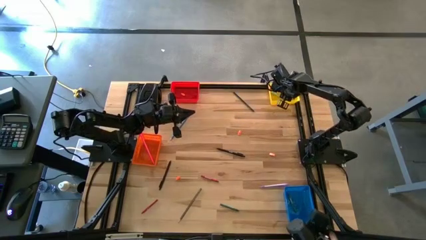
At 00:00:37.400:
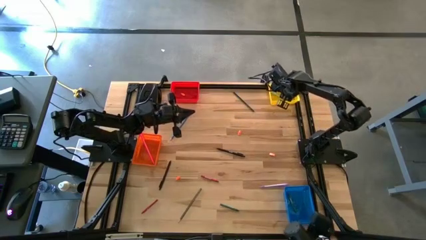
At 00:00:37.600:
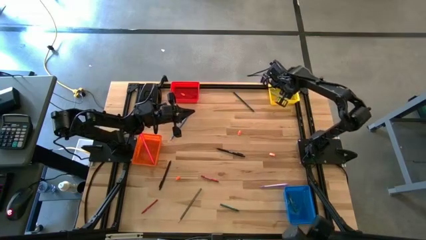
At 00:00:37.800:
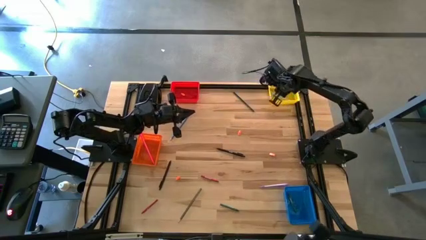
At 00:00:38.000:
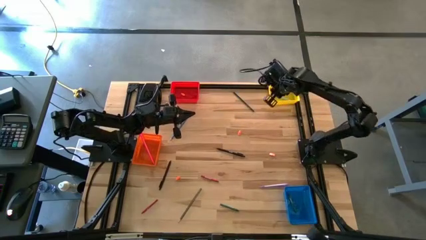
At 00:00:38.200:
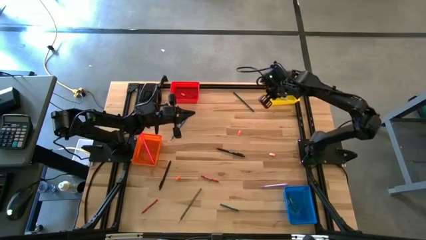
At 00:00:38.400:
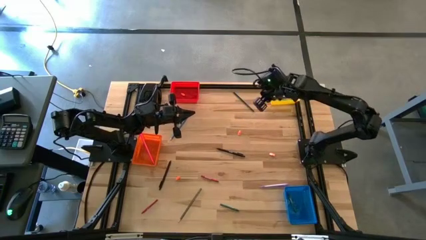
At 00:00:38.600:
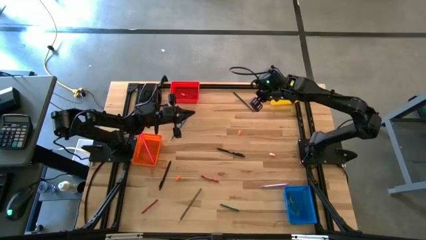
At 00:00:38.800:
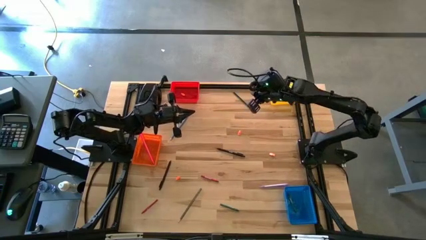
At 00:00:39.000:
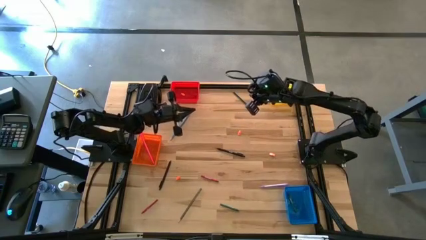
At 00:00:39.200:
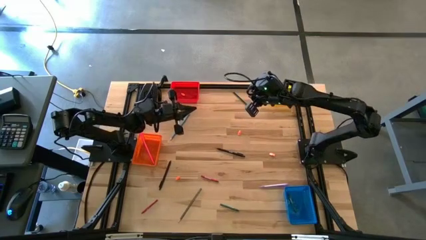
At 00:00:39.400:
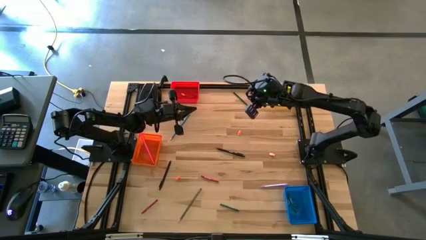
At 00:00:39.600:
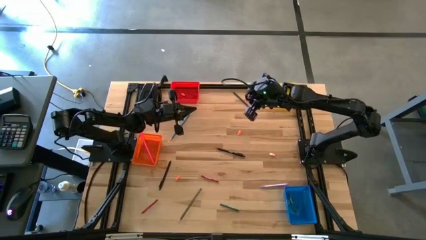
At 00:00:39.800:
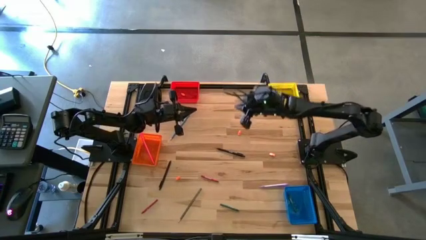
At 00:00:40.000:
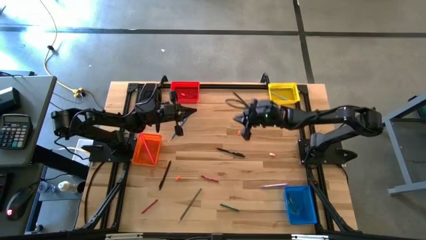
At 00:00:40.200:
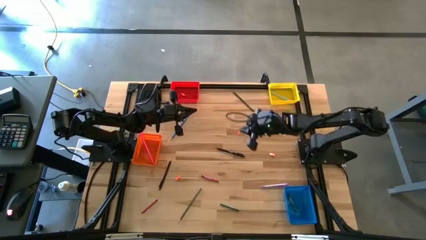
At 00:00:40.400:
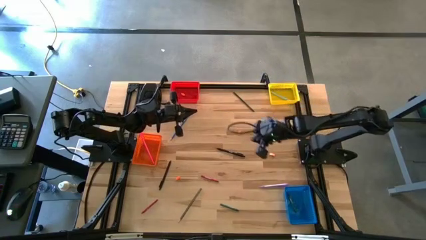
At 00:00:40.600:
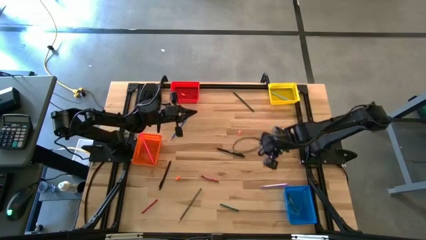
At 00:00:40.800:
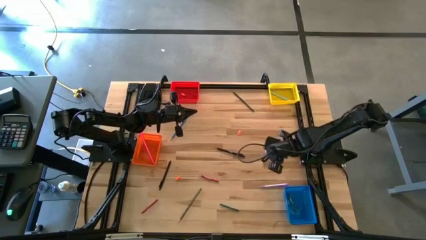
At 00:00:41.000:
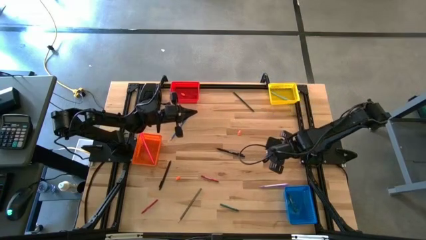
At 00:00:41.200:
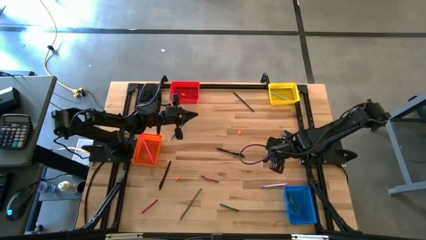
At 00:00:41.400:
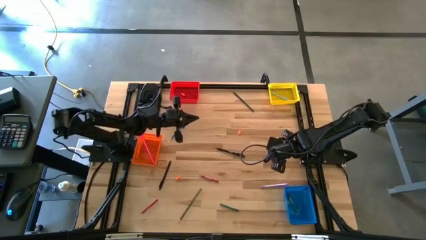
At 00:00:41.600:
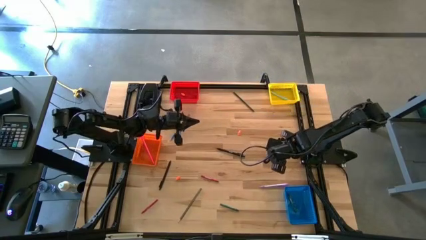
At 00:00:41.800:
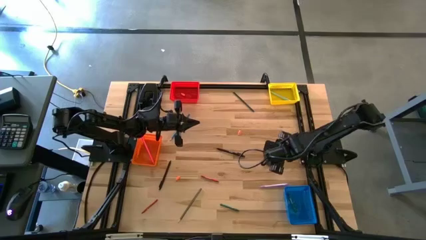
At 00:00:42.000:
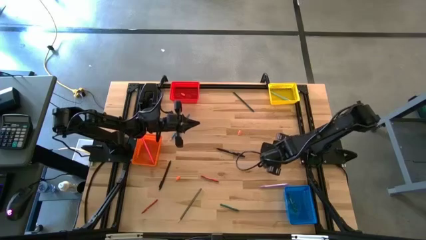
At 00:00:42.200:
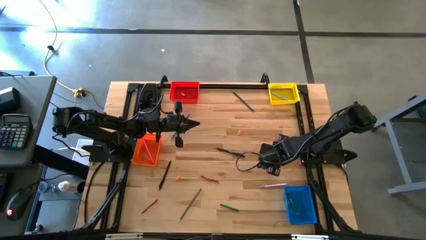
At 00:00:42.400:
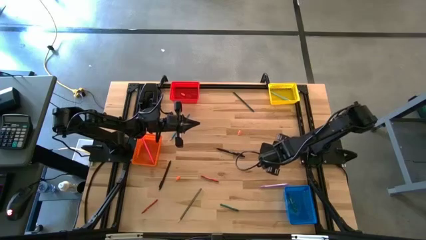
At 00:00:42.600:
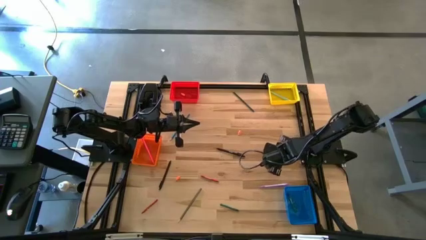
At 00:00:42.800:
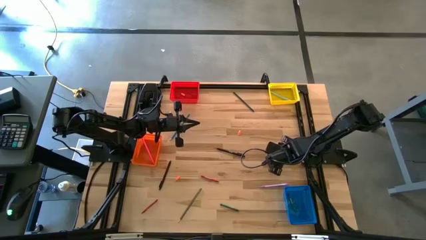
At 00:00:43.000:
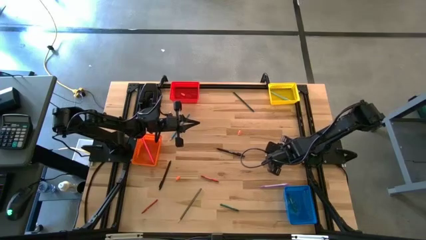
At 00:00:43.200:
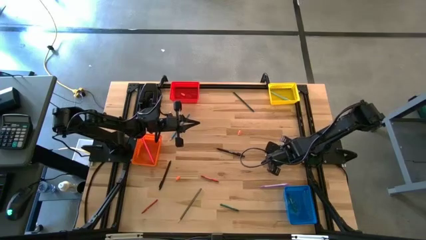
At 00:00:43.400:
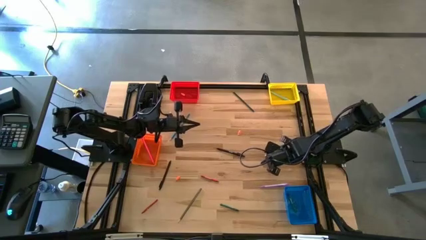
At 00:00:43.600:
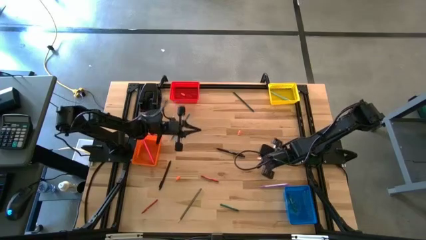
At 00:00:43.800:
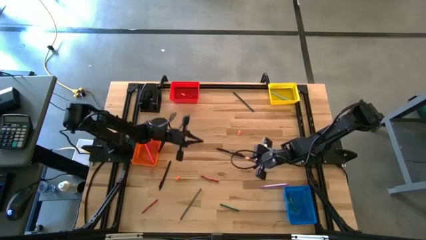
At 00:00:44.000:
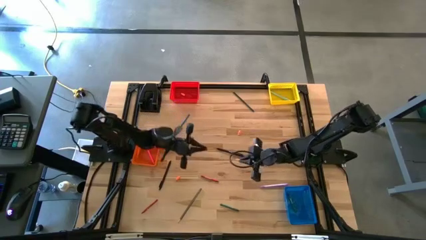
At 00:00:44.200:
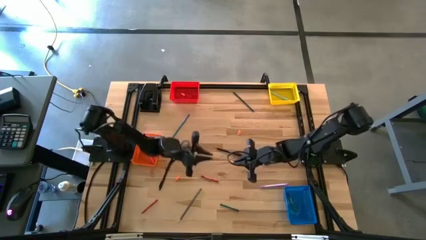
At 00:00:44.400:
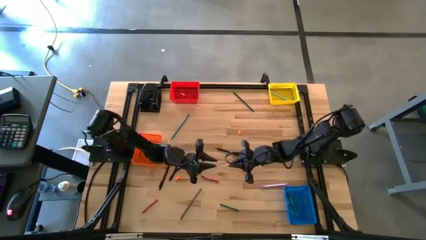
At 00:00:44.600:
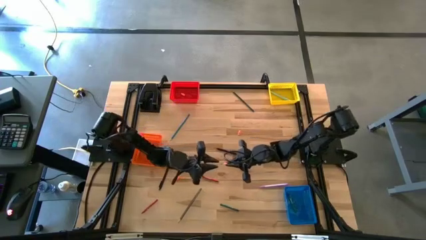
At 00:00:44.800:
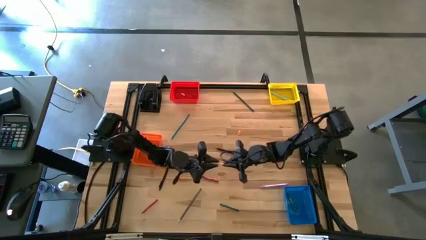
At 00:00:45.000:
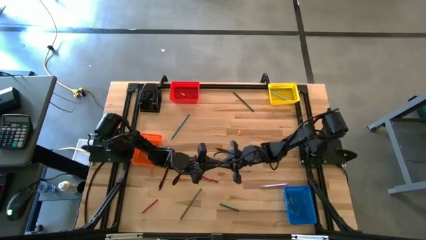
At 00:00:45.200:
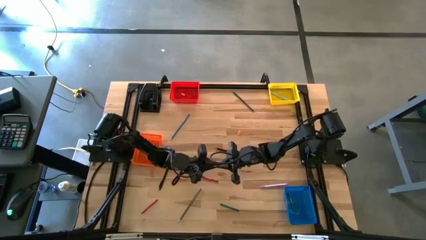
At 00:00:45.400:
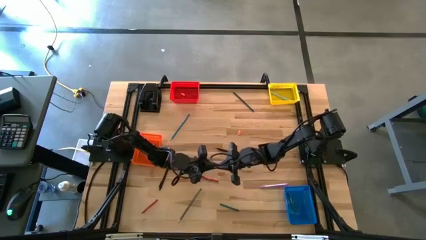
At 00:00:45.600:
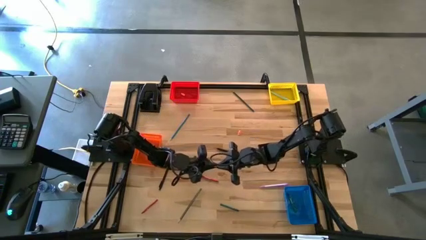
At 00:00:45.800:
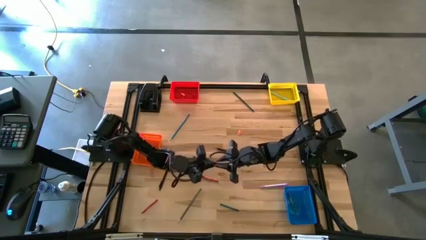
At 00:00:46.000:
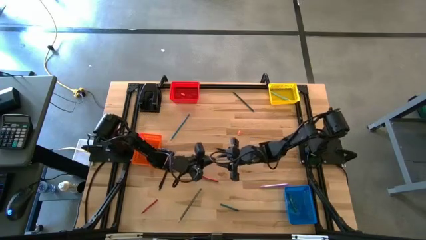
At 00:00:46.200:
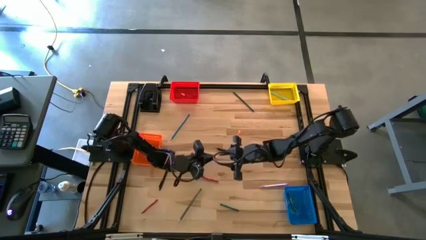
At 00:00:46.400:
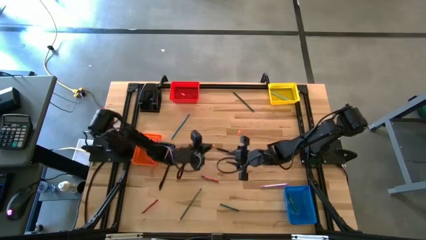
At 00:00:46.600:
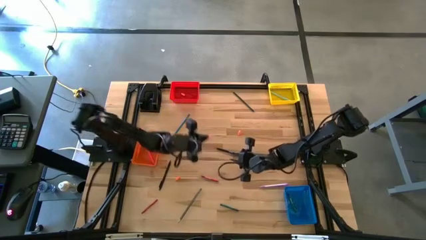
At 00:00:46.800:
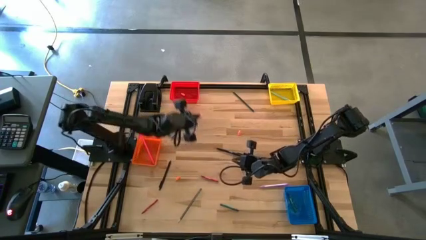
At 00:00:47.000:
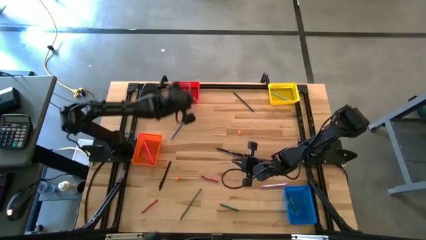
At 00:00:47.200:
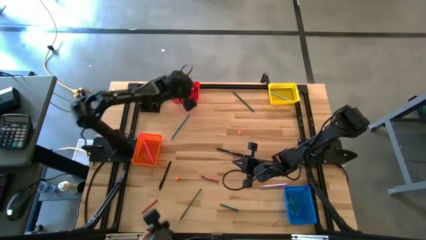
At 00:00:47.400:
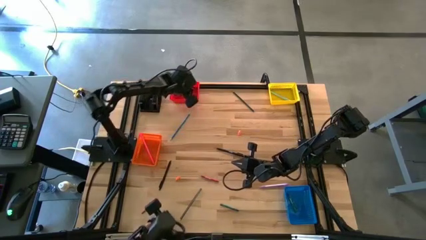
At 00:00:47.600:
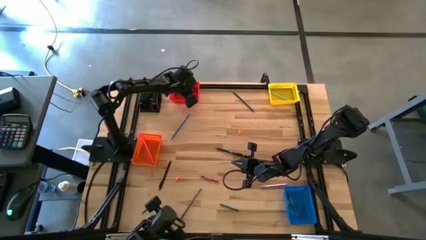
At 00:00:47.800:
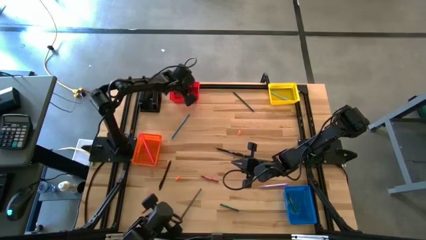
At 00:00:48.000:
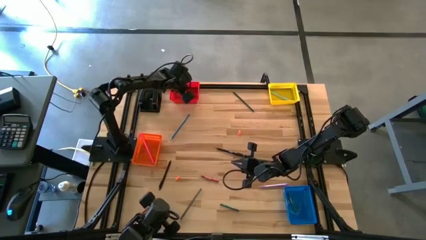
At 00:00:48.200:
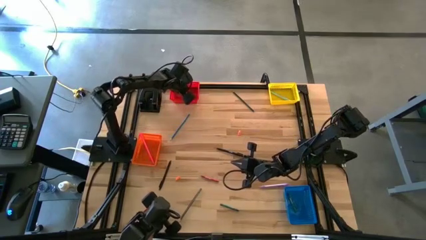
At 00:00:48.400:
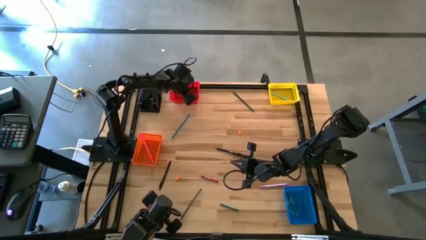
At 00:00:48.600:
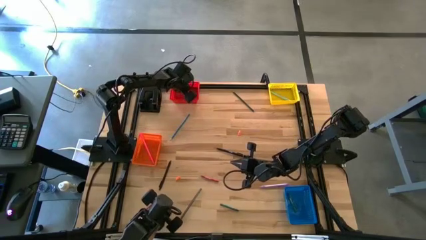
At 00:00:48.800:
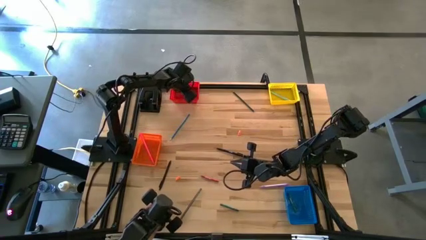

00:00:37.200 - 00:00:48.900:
Task: Sort crayons/erasers/pens/pencils in bins
Put the orange pencil eraser into the red bin

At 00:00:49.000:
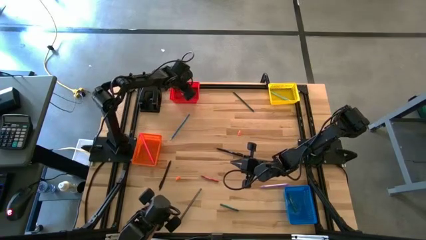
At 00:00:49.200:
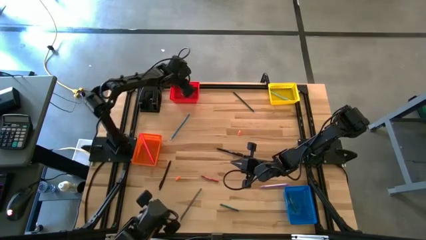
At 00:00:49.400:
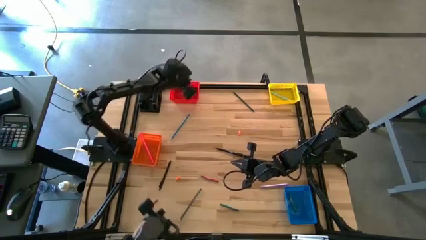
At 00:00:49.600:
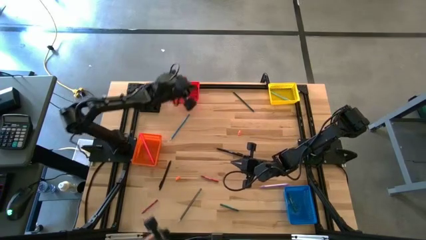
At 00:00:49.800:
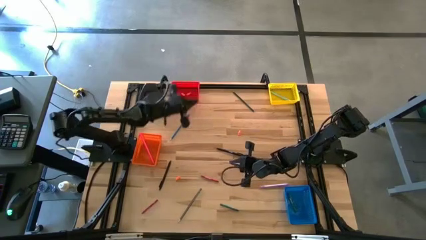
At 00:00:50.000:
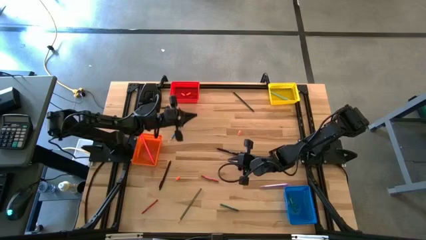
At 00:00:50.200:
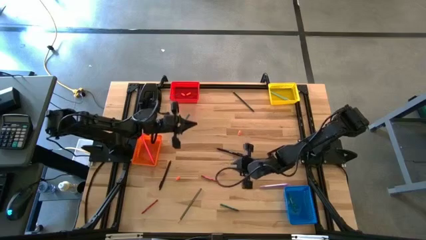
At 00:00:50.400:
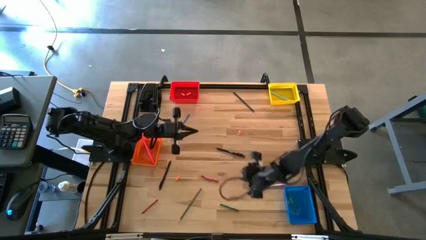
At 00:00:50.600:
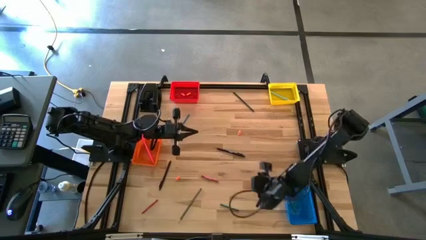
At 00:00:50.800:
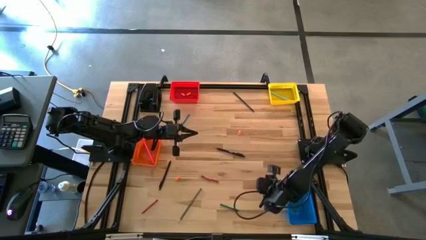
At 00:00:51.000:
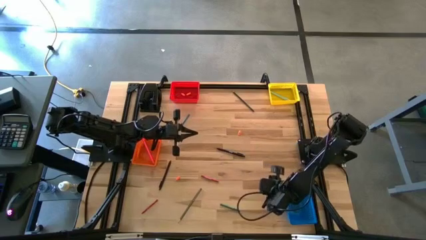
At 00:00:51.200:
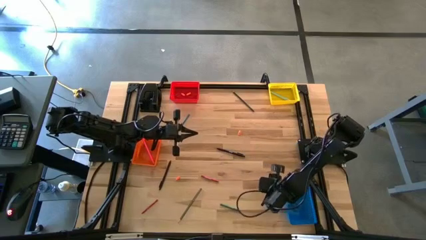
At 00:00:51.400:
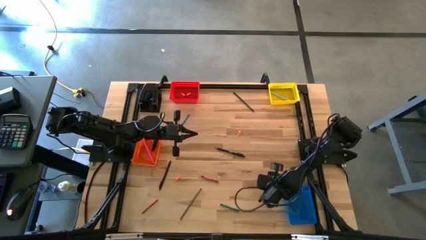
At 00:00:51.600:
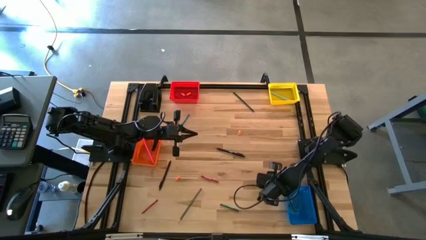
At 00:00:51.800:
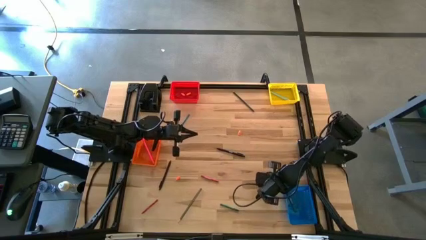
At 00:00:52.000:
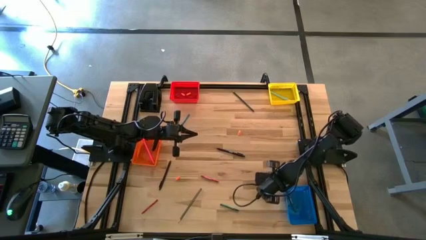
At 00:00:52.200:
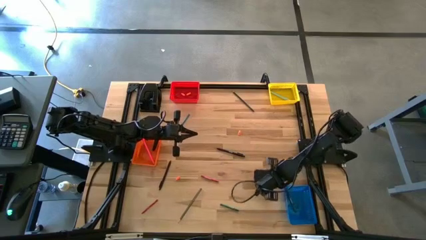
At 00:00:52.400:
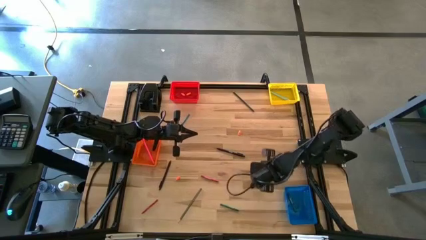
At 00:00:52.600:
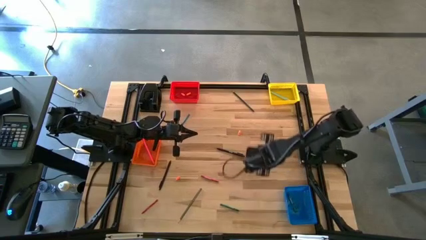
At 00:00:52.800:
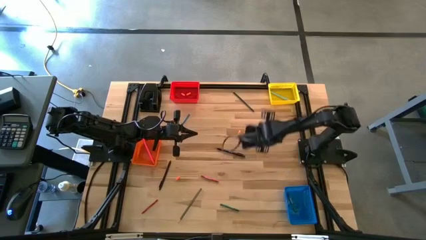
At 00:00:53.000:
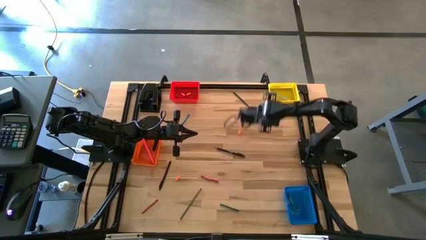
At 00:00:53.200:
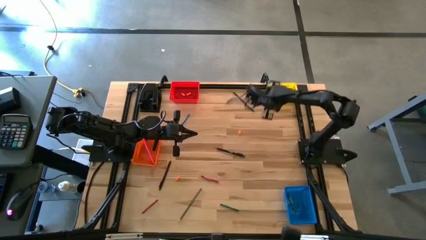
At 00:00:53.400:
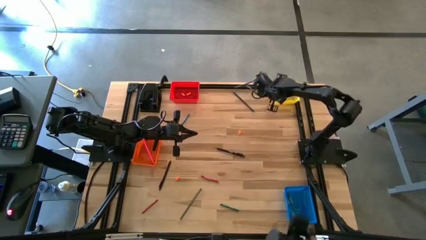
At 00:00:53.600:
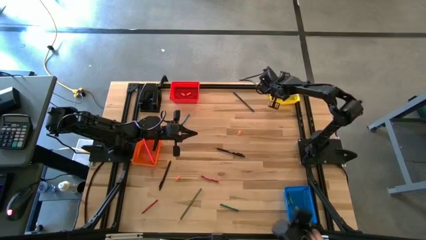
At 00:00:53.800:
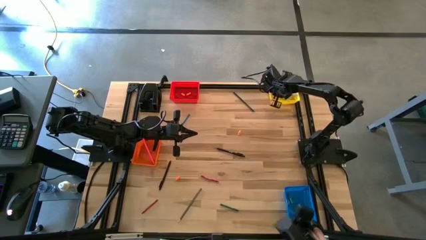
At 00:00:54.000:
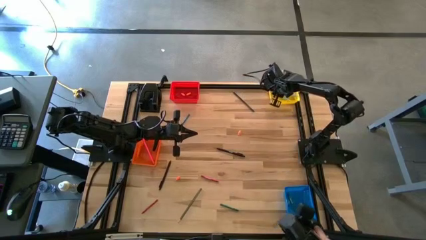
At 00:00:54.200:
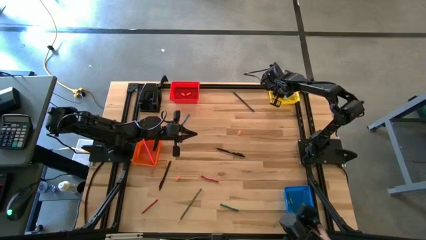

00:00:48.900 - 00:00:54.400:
Put the purple pen into the yellow basket
